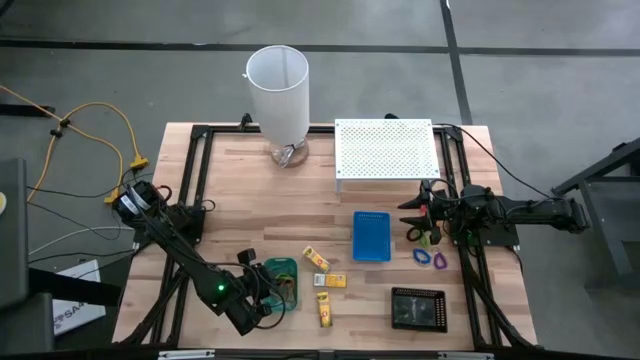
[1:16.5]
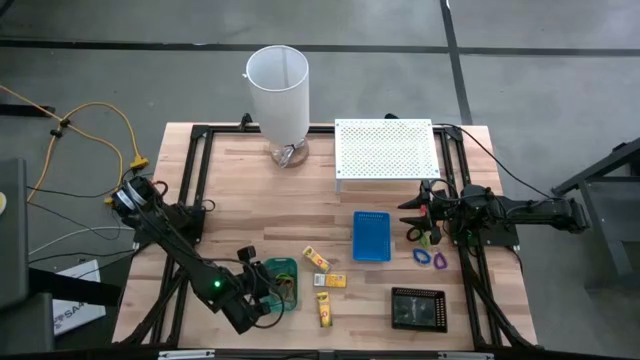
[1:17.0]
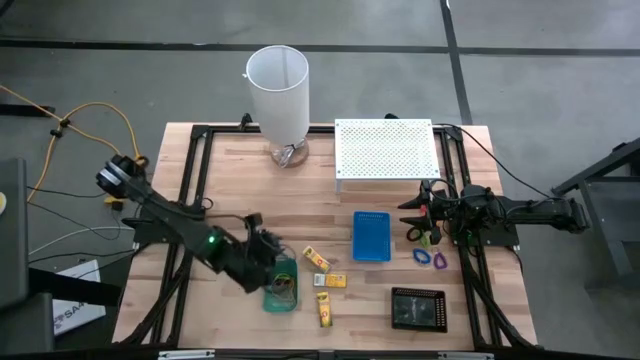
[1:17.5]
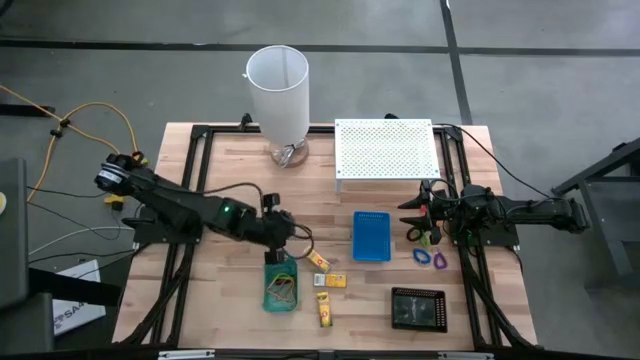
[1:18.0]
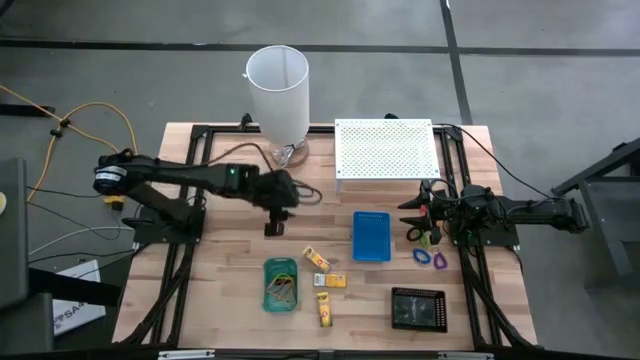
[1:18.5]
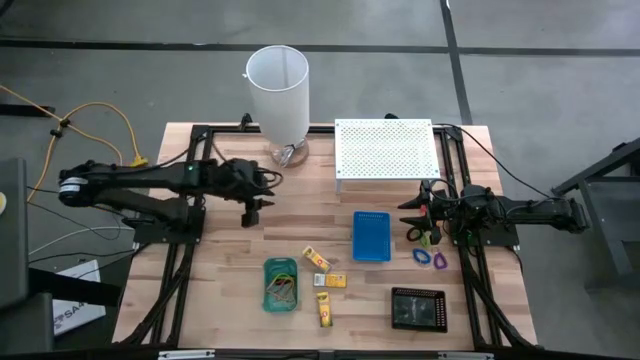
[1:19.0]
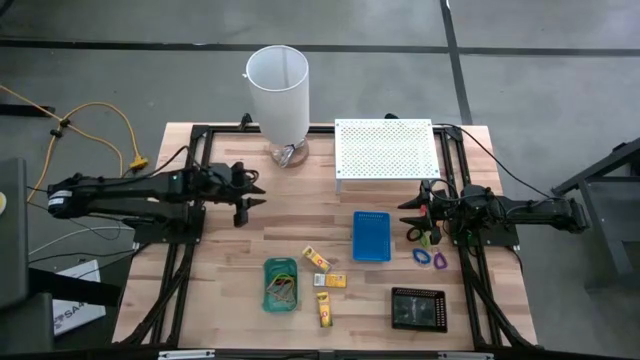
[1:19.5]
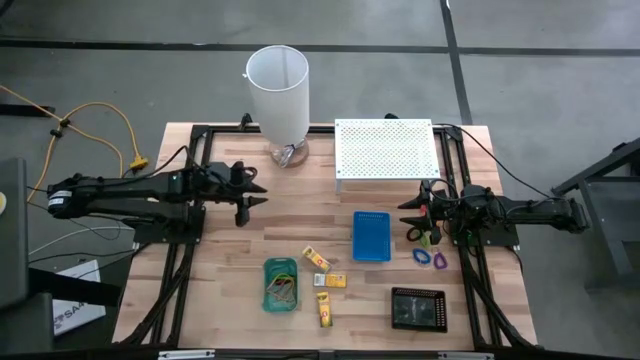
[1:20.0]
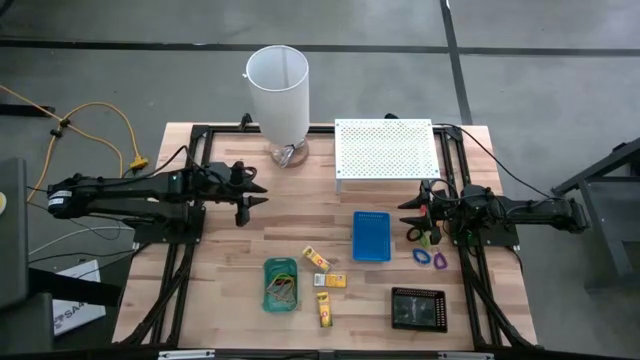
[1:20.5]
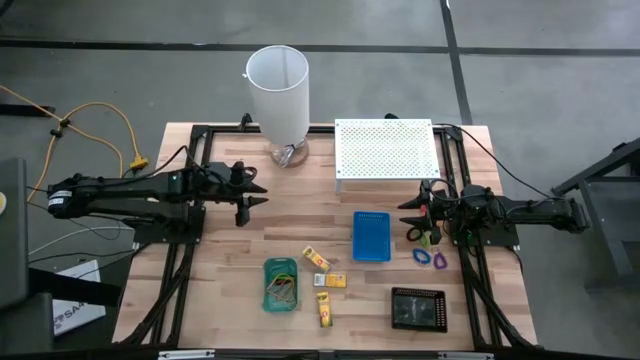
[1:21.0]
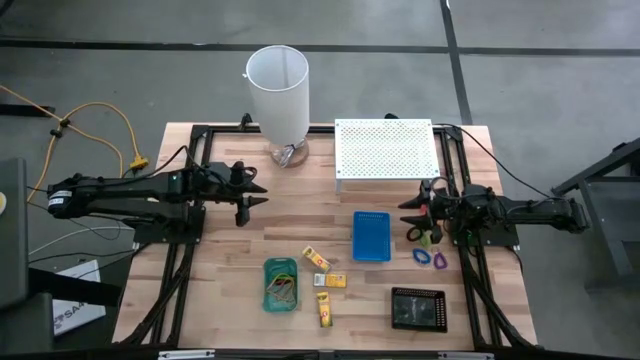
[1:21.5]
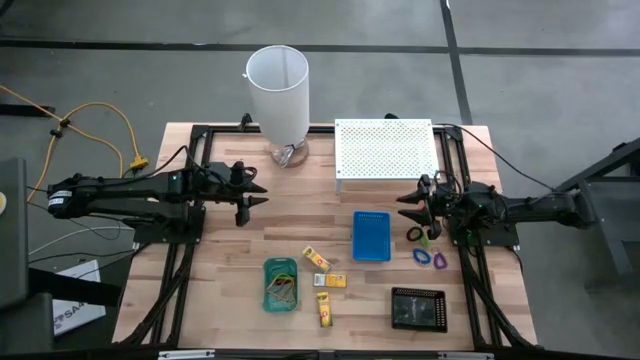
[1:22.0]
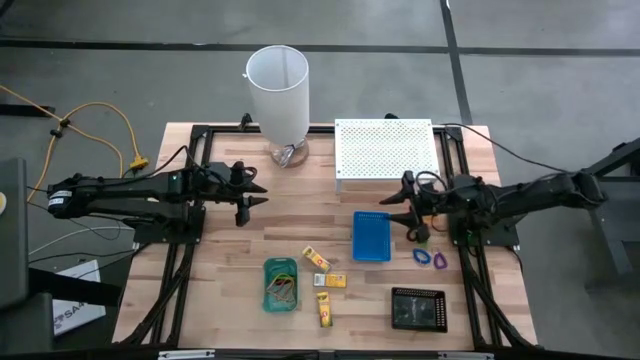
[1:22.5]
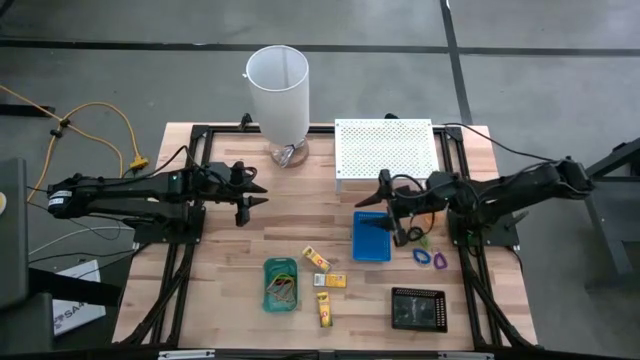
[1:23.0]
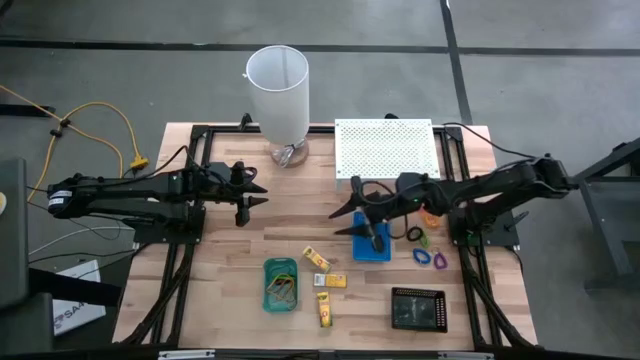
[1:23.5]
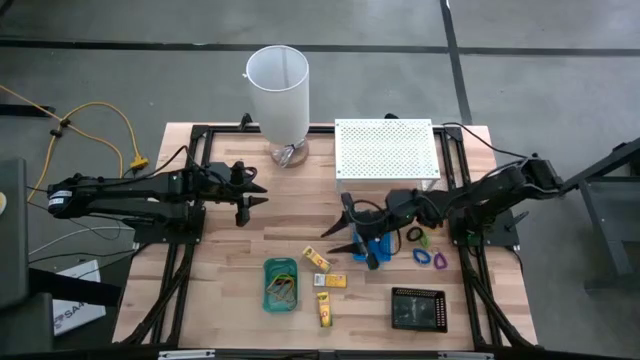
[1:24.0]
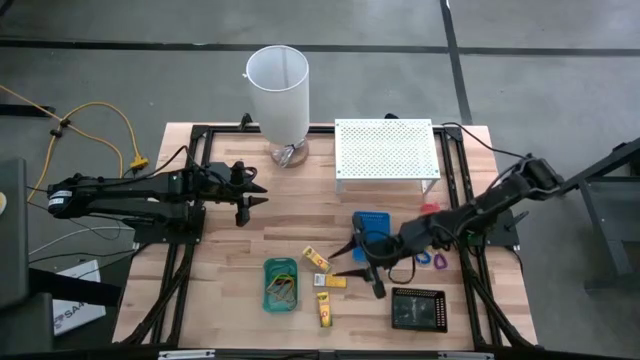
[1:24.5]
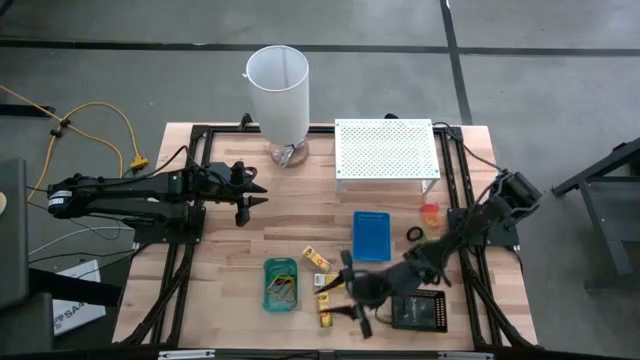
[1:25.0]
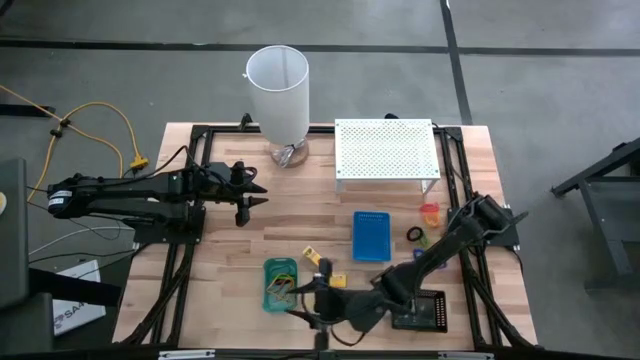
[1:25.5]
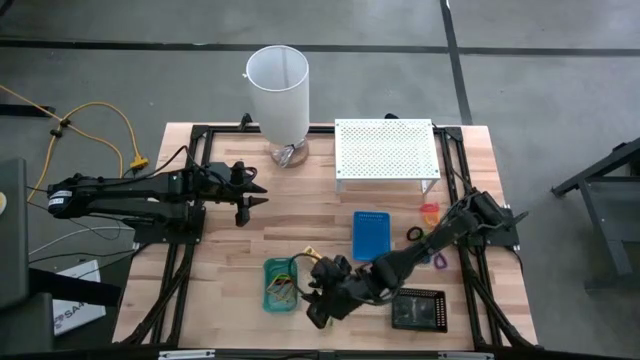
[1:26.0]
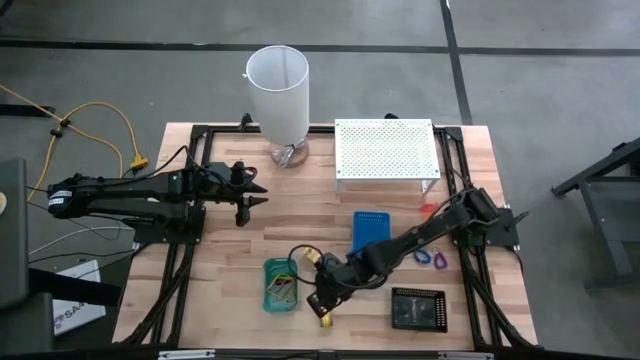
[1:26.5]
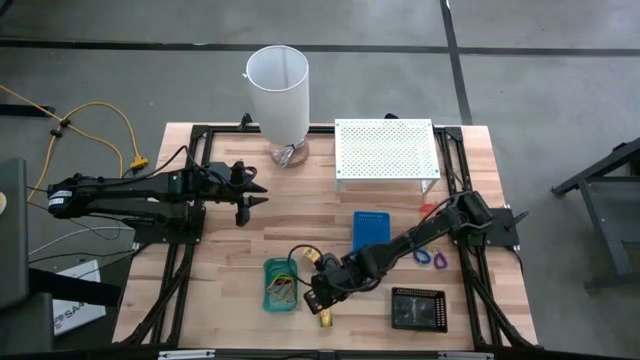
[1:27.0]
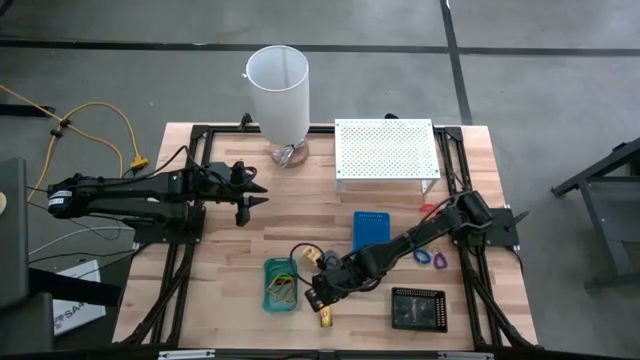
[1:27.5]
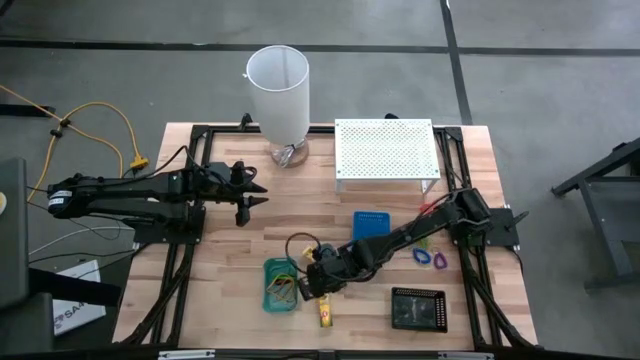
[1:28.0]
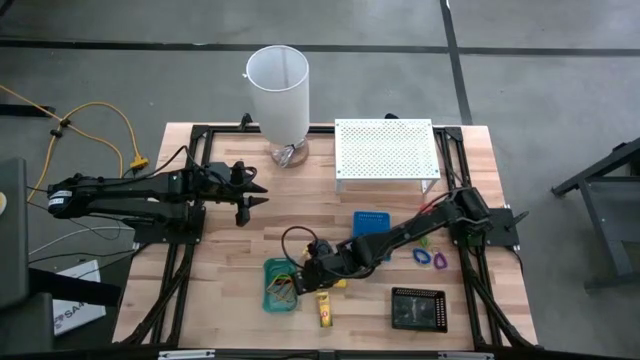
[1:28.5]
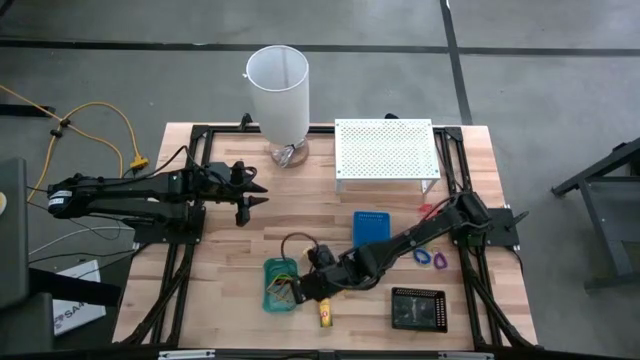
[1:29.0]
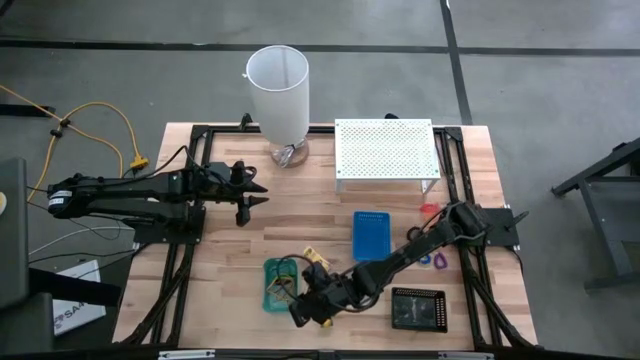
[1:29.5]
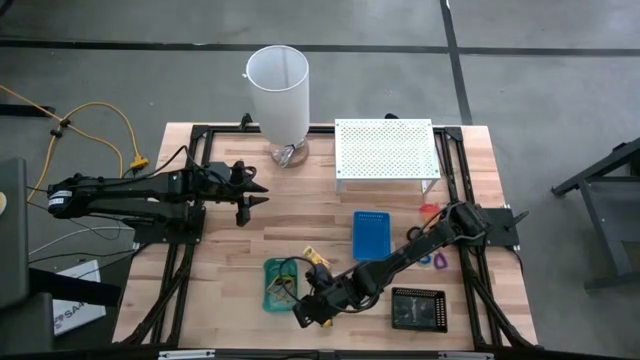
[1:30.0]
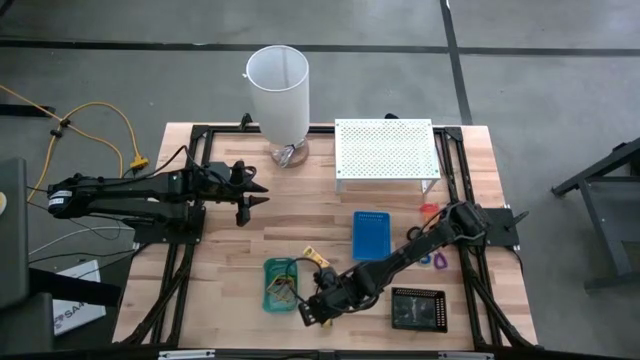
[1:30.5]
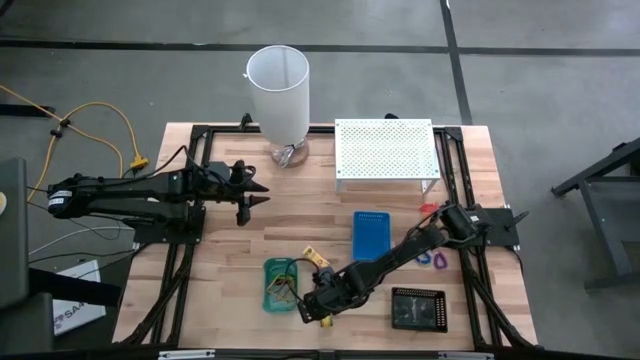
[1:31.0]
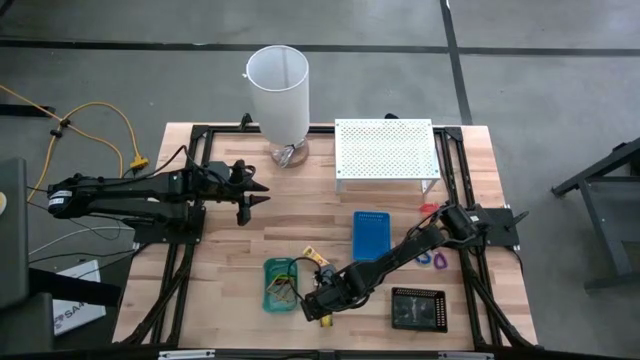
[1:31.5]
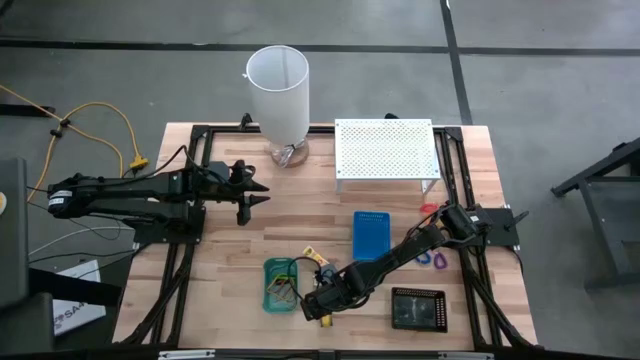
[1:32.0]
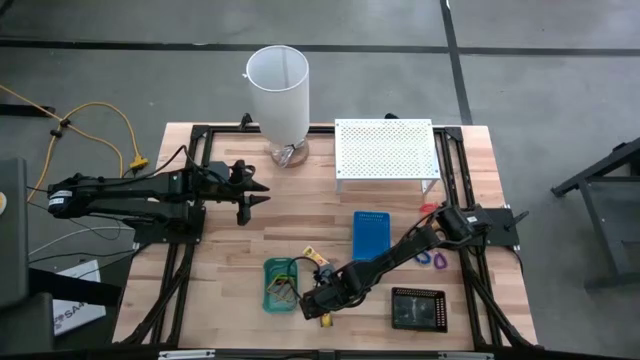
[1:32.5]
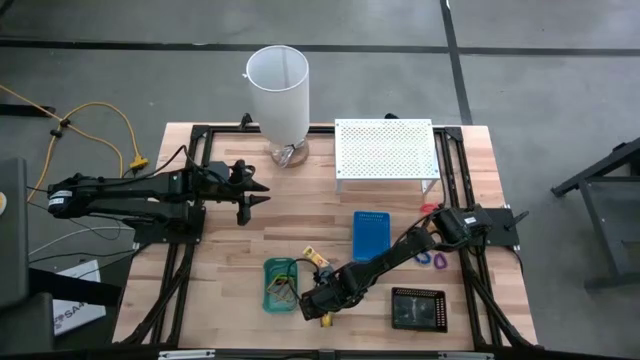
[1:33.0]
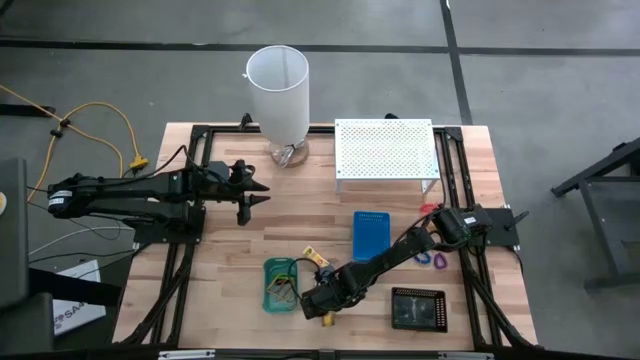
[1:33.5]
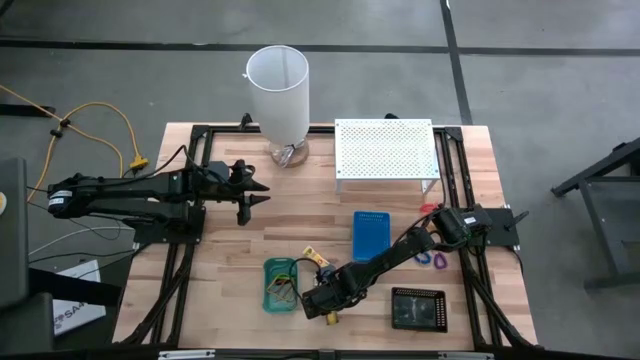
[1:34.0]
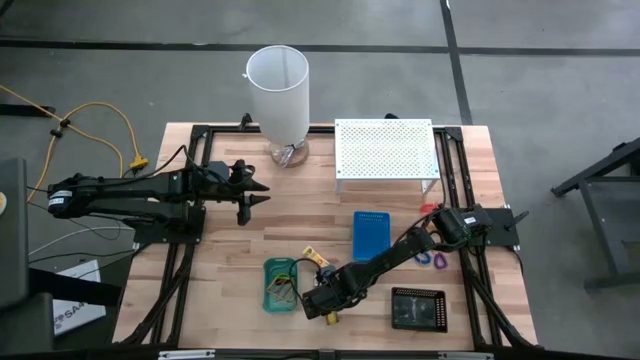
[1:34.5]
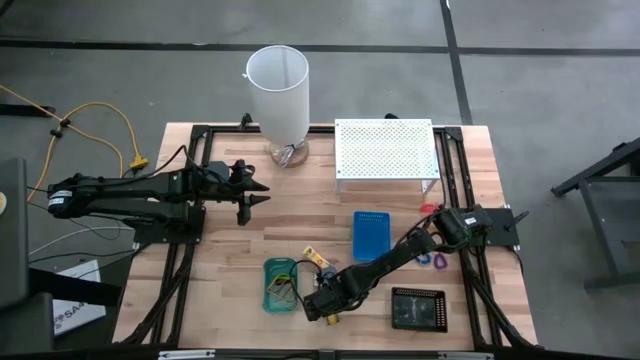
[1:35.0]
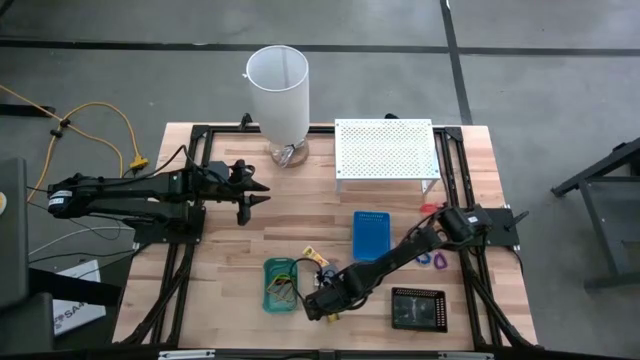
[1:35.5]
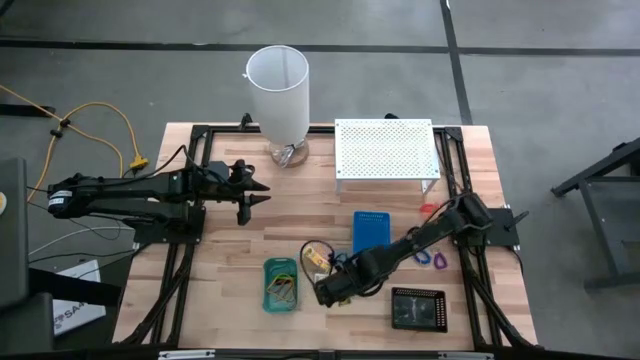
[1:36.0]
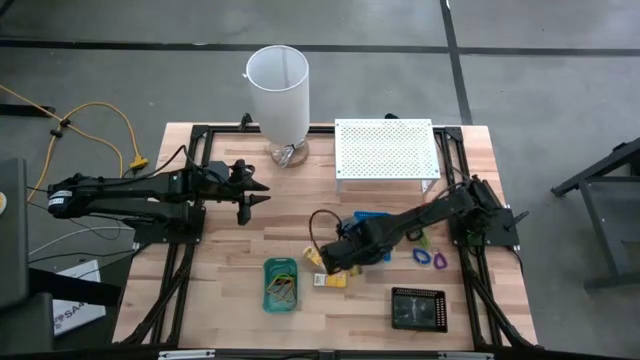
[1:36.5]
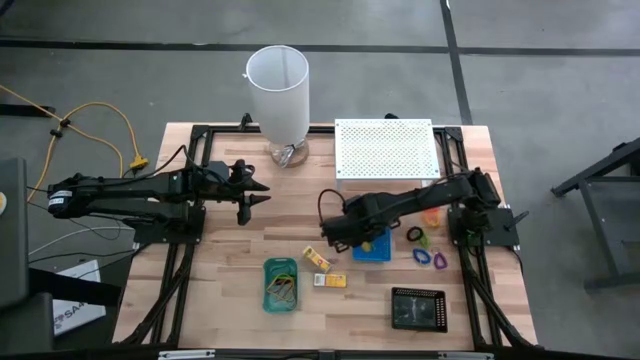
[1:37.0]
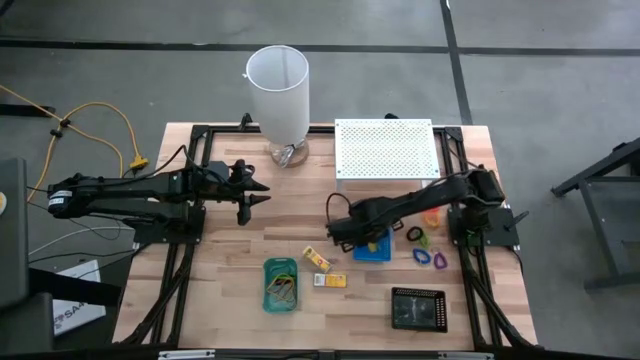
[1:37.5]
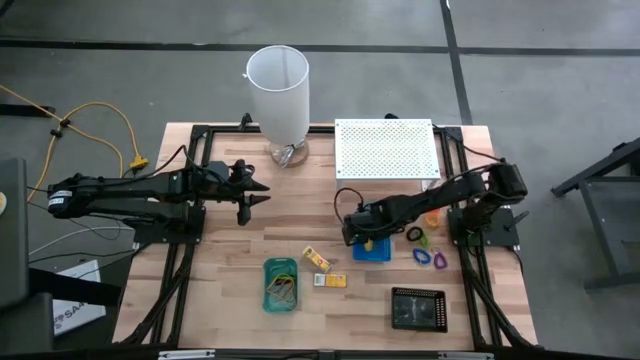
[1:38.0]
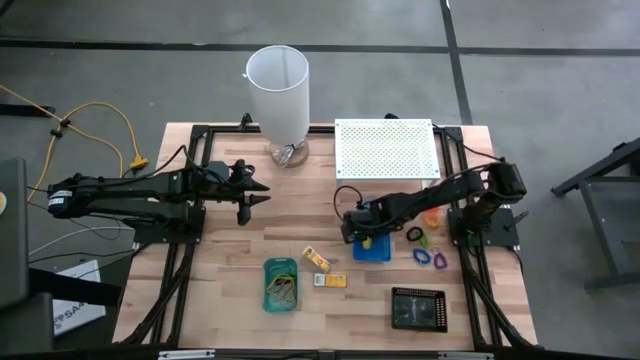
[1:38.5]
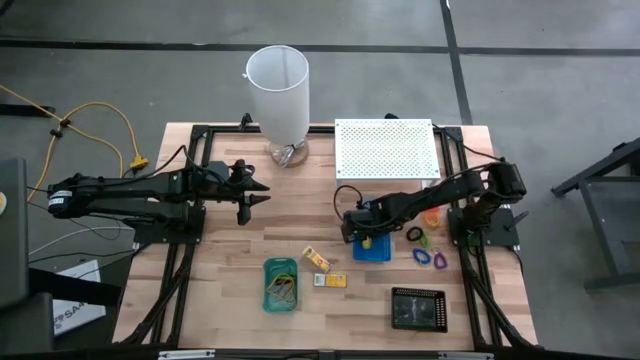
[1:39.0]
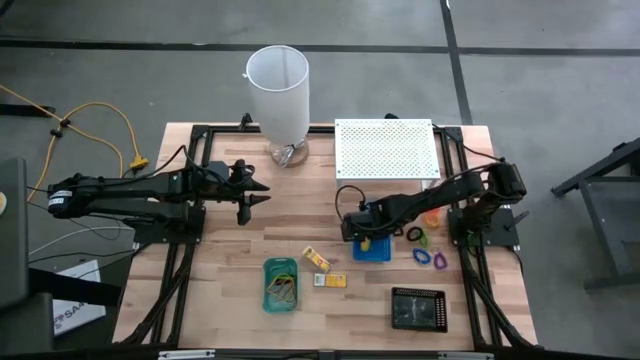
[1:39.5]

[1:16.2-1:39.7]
Task: Pick & Place Office Desk Supplies
Put the bottom crayon box into the blue bin
